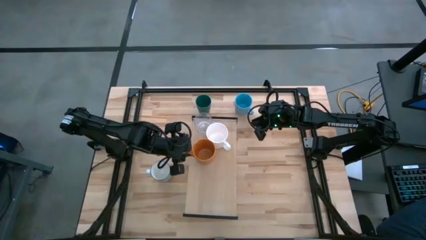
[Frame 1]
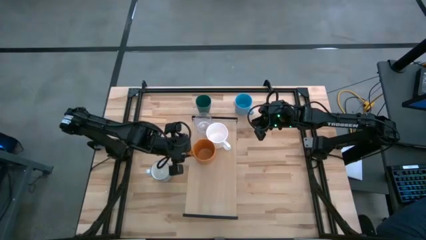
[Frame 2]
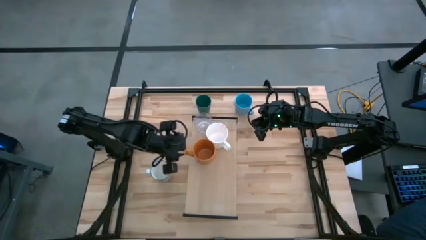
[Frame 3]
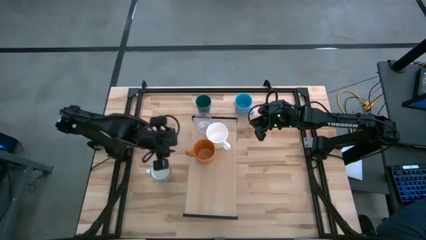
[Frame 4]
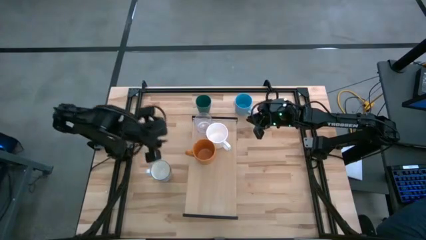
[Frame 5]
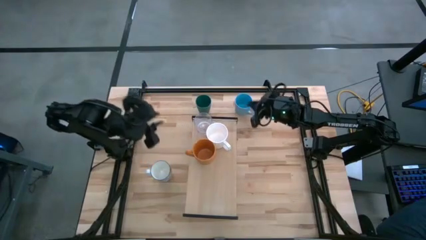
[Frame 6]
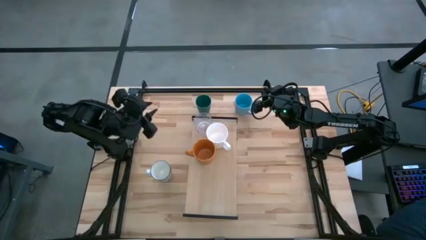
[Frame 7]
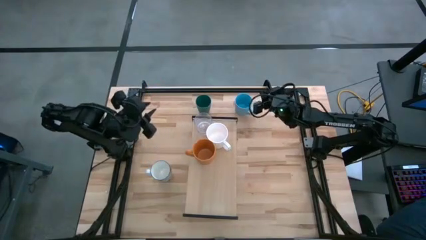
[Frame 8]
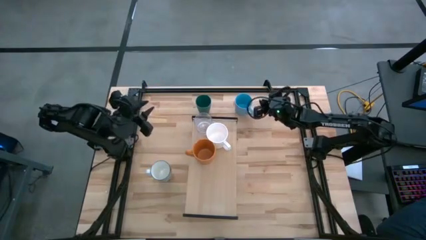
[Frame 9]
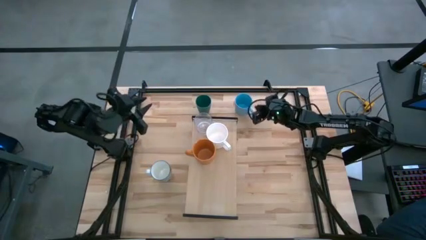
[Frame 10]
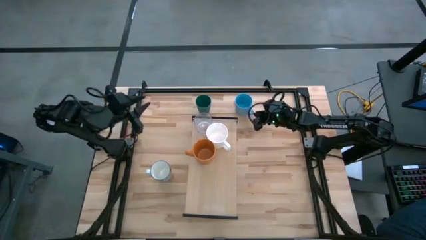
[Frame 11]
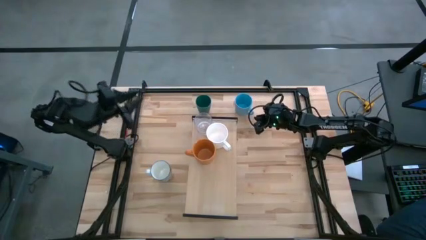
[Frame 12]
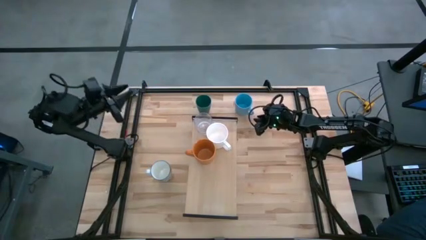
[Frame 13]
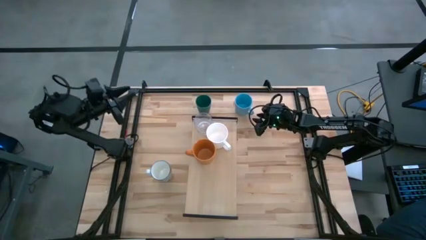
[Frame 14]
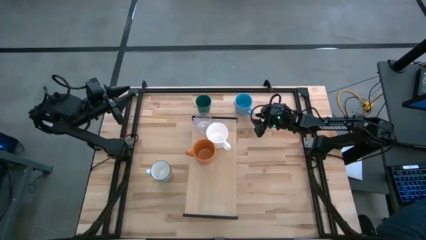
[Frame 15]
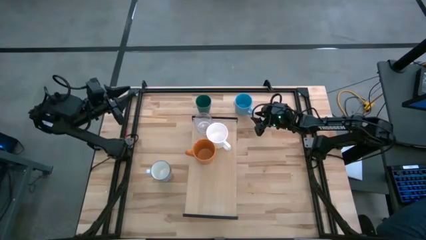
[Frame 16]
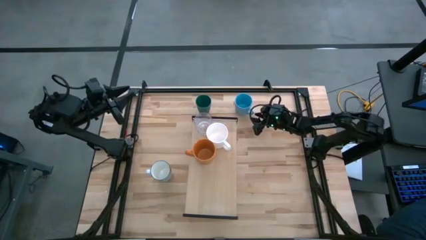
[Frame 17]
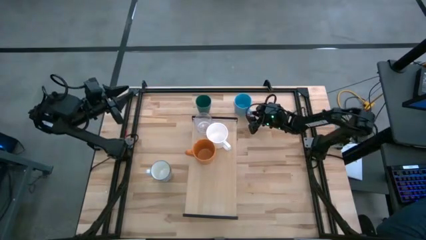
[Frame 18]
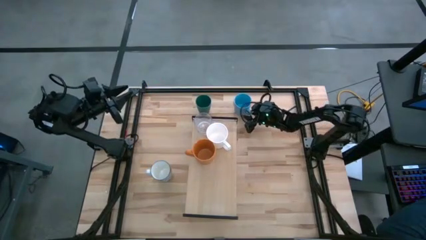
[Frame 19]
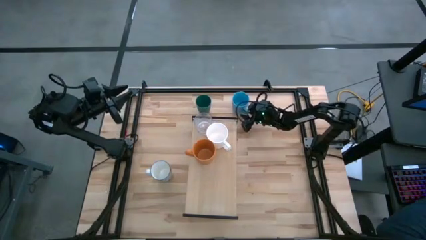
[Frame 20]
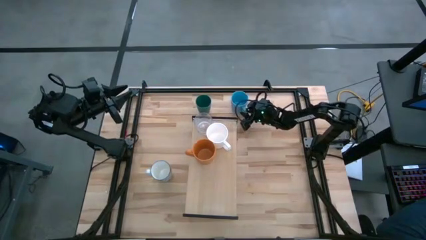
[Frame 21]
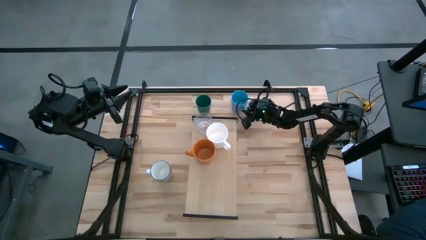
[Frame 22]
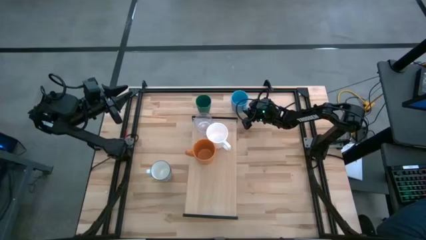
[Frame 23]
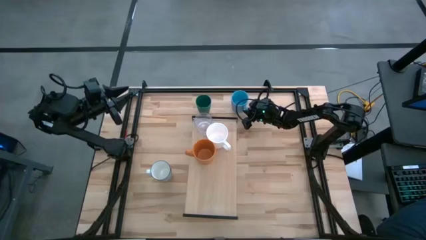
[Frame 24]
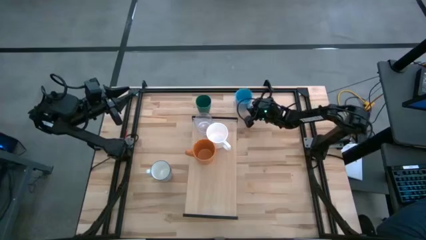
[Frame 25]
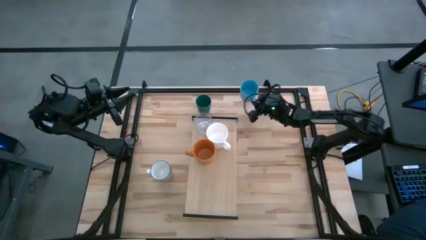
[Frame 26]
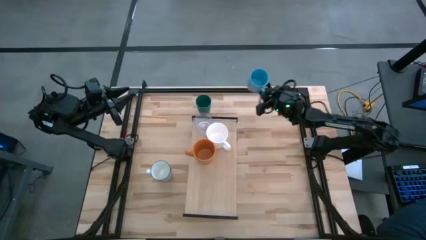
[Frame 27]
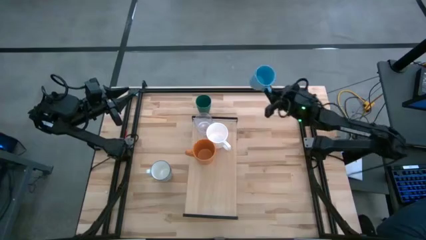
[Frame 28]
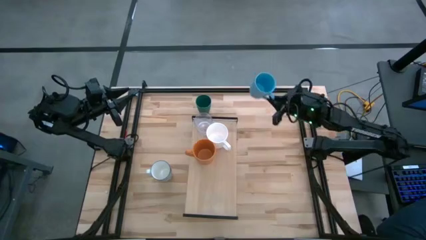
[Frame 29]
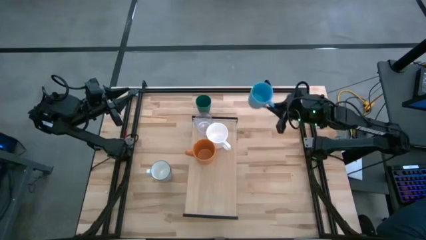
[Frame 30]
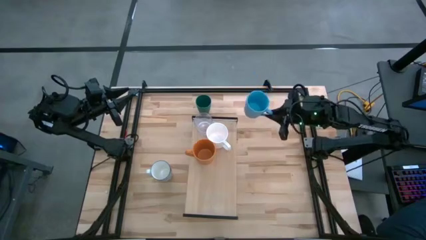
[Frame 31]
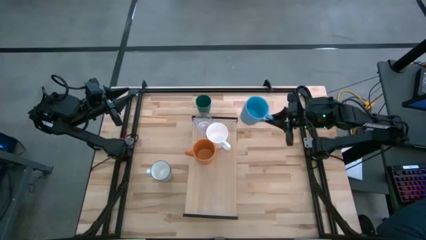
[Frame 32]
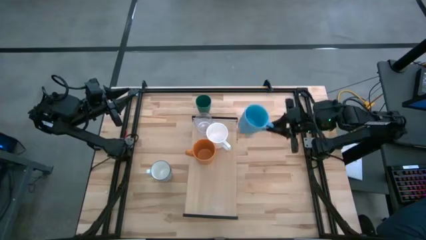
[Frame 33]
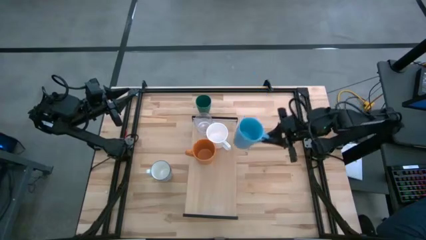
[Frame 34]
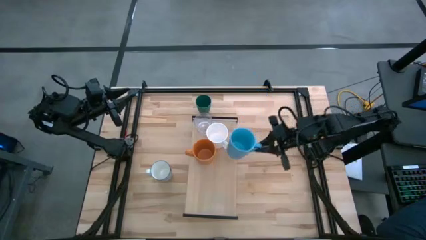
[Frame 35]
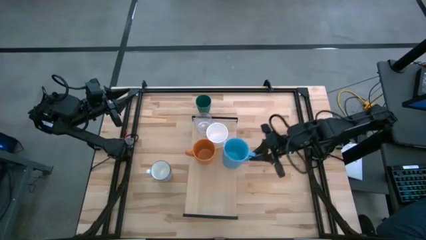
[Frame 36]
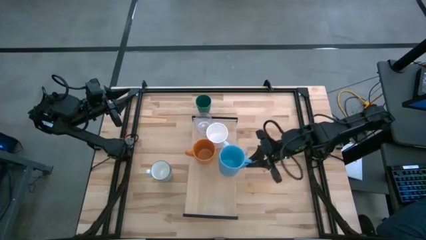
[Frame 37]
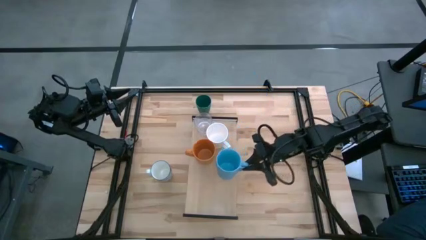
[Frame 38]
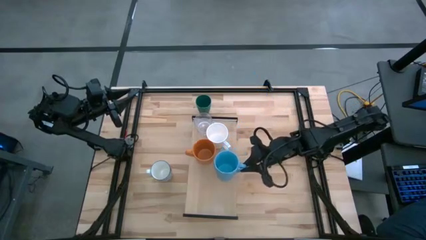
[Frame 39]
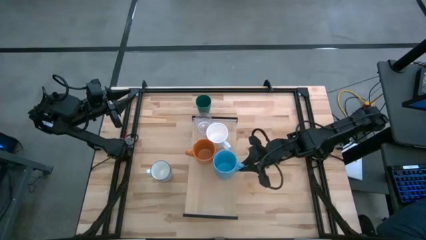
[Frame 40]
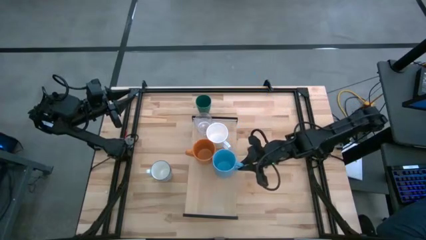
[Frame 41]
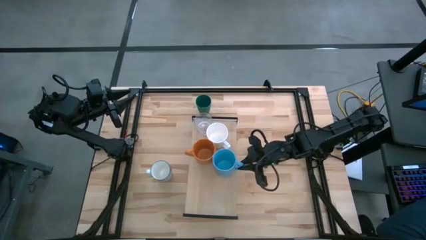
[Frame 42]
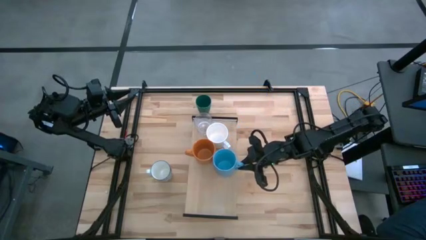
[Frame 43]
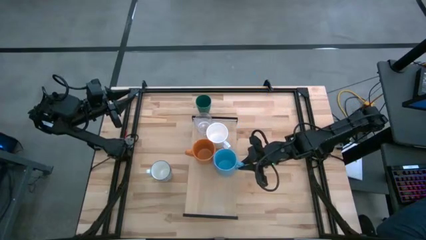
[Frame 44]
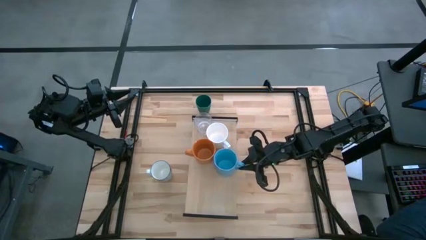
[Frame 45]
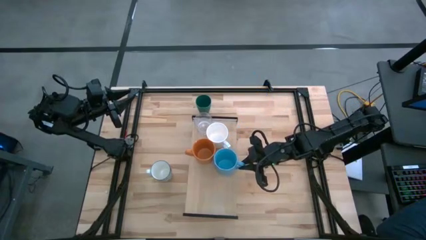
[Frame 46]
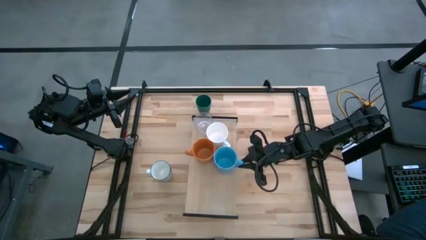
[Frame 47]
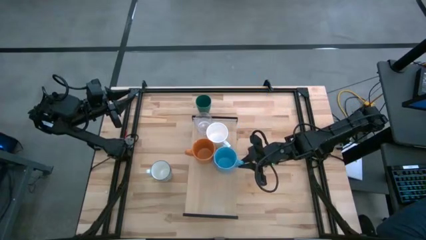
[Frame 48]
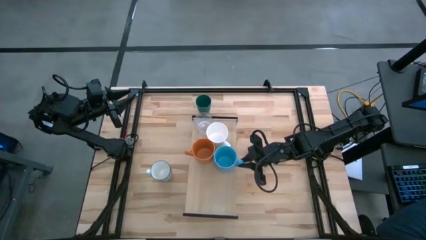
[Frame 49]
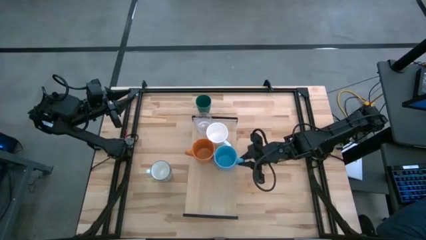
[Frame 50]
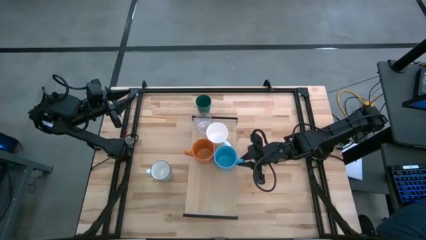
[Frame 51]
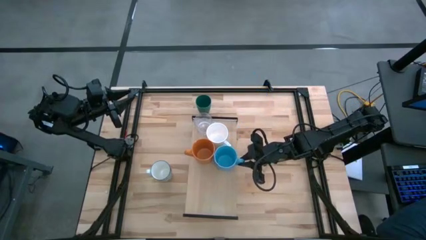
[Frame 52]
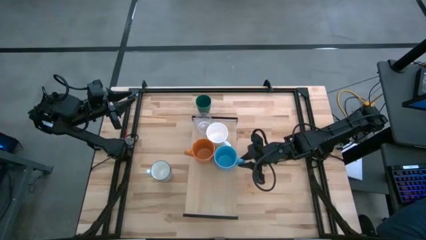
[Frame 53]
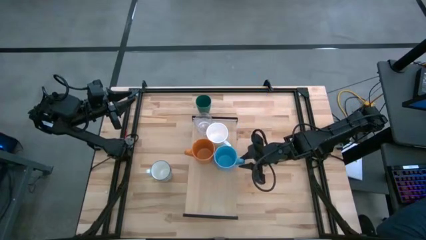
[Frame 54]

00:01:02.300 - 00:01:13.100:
Task: Stack small to large cups/mugs on shelf
Put the light blue mug on the shelf

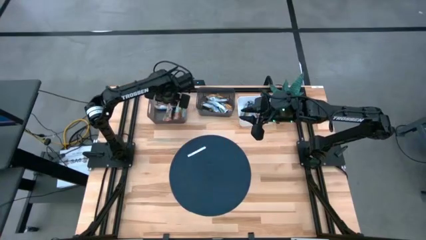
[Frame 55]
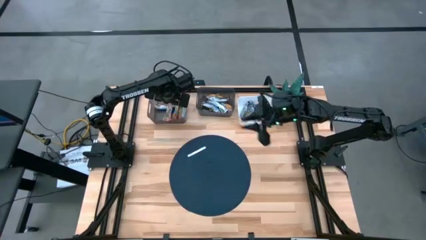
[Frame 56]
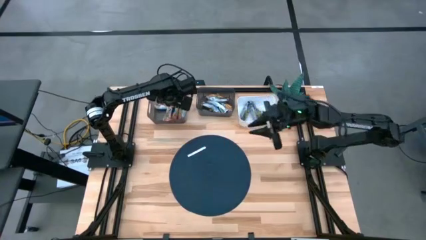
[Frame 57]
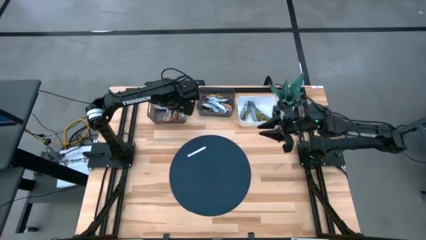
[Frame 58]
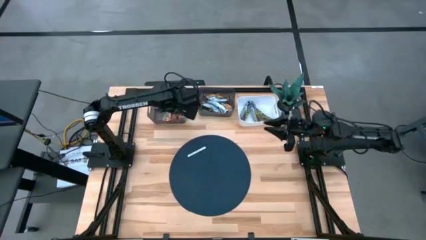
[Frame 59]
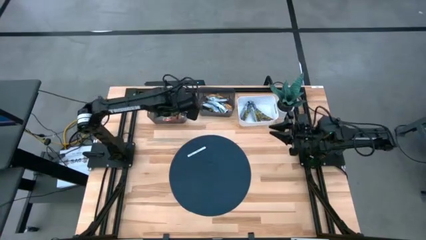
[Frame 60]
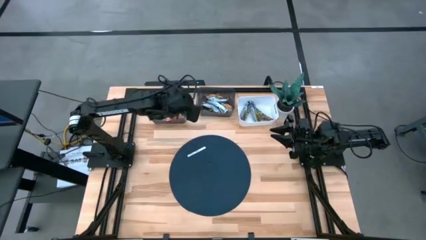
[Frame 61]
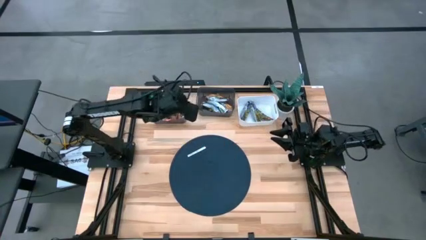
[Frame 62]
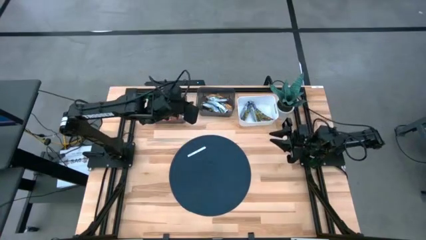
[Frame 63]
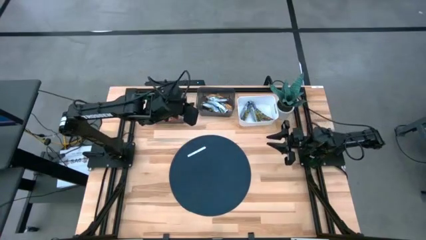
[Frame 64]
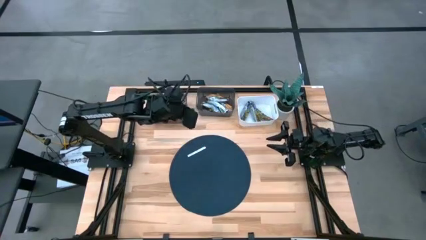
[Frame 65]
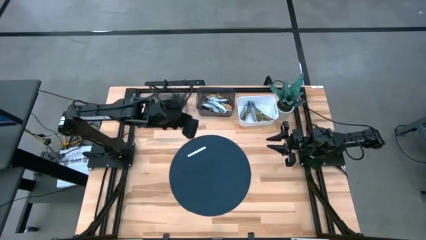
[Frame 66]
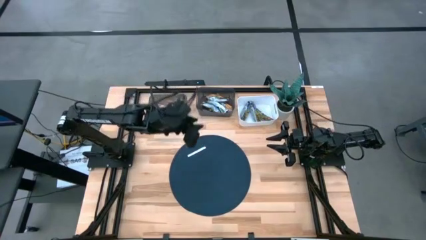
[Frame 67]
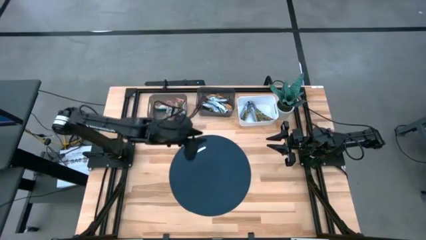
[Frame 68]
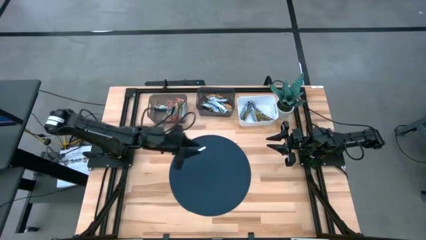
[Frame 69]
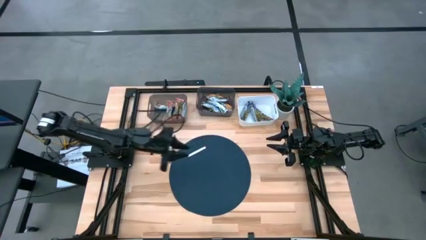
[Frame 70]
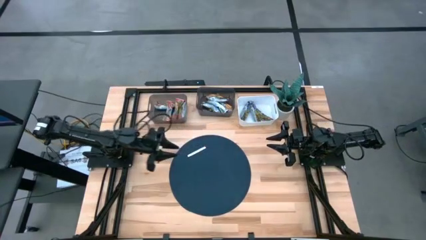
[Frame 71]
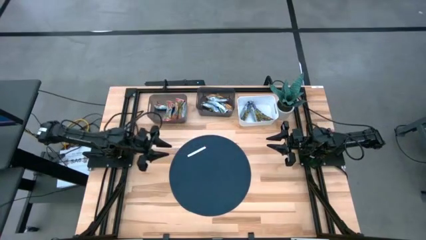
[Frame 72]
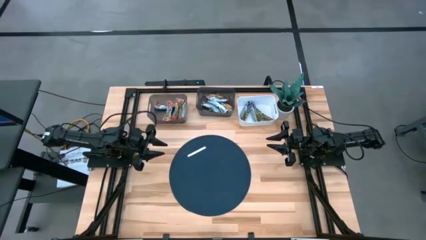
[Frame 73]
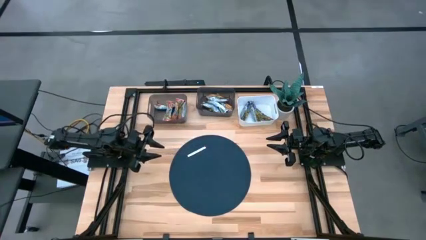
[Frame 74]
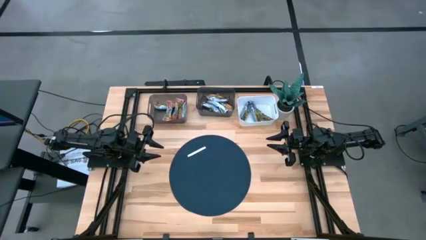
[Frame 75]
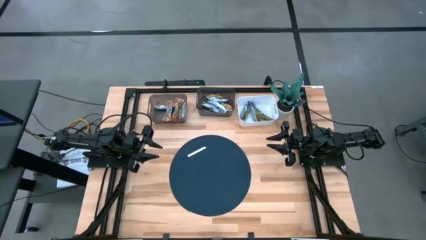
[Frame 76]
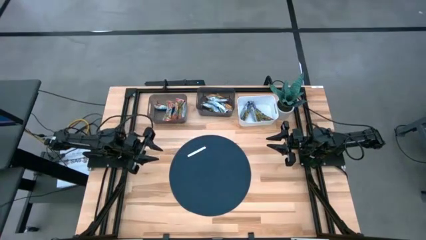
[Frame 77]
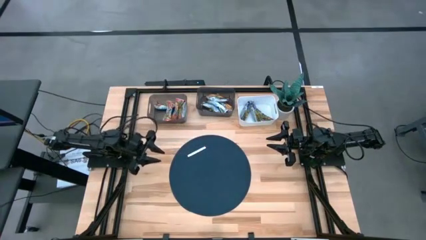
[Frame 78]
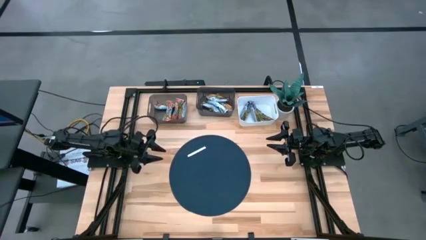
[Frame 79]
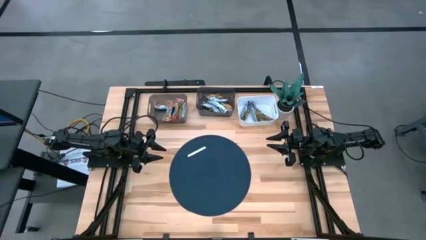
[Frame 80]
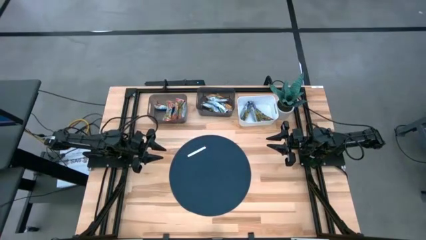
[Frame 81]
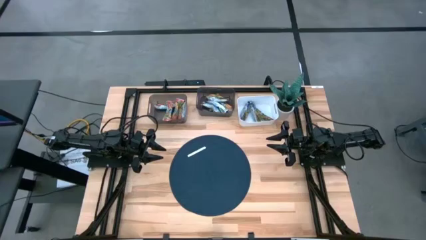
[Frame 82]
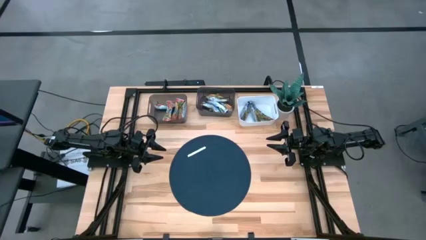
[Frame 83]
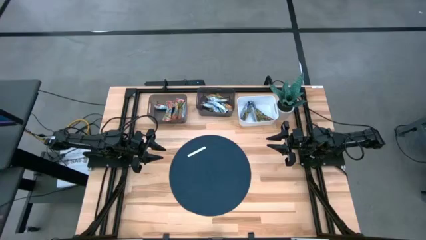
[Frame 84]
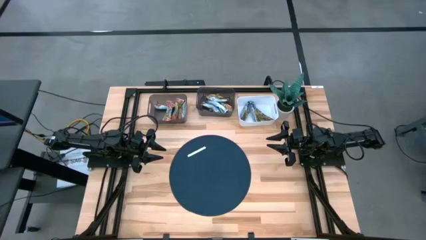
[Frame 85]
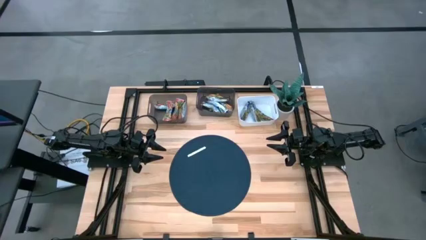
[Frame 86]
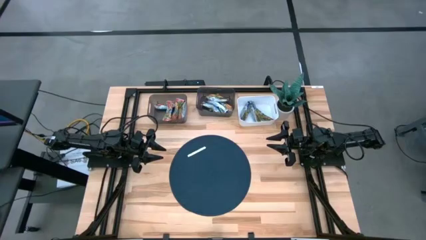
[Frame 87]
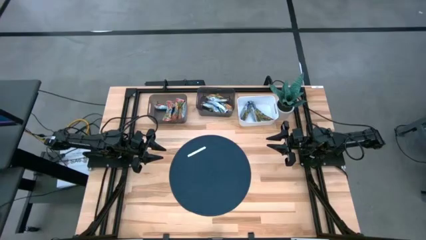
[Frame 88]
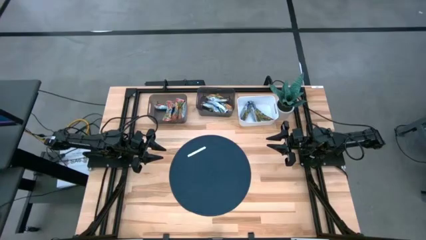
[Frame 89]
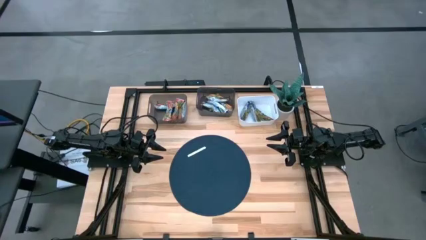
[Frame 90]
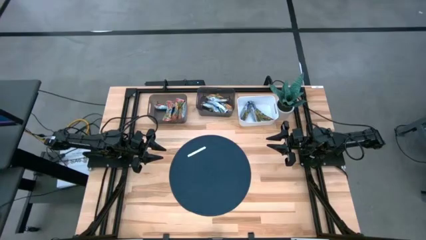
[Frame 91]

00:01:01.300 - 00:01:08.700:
Task: Pick and place Granola Bars by type
Return to Home Position
